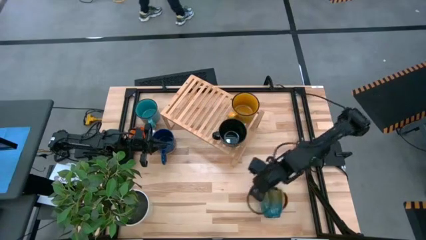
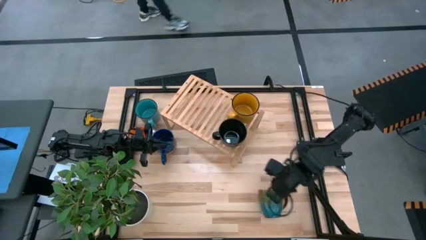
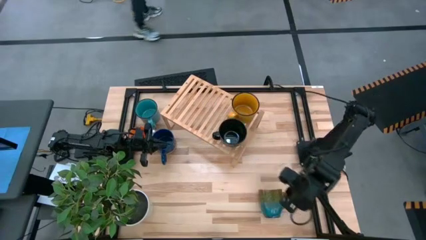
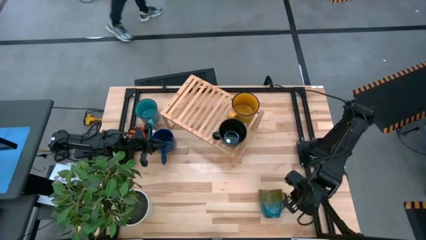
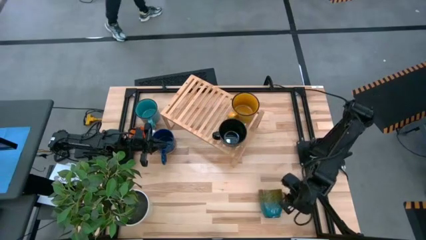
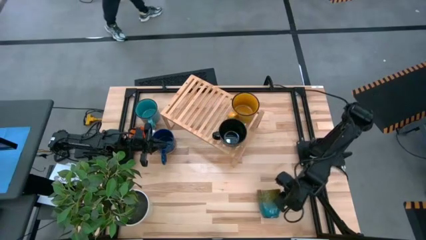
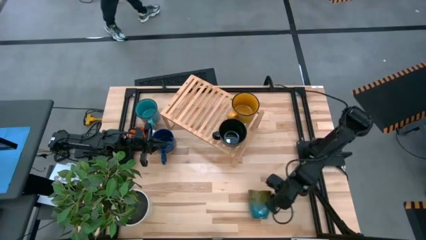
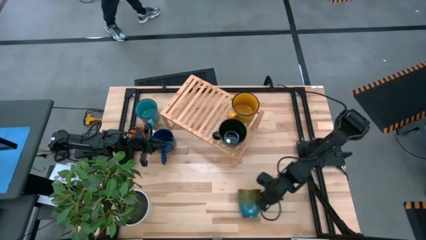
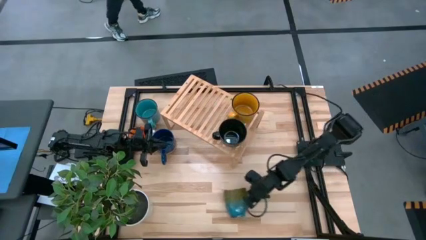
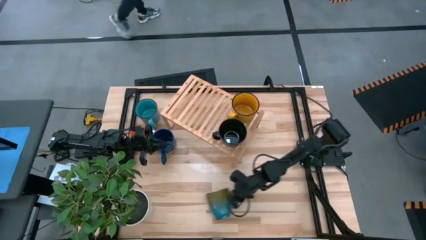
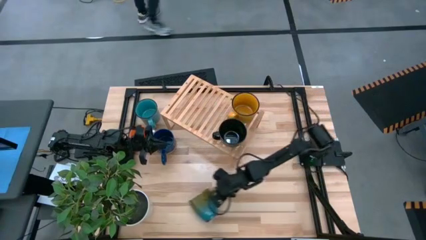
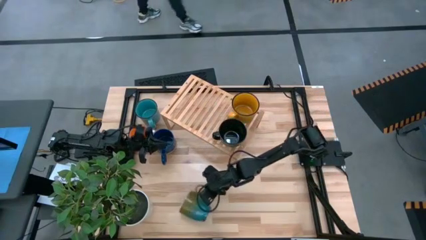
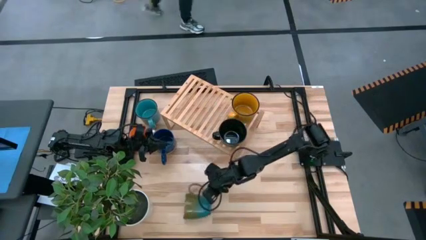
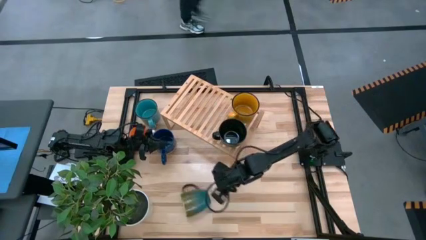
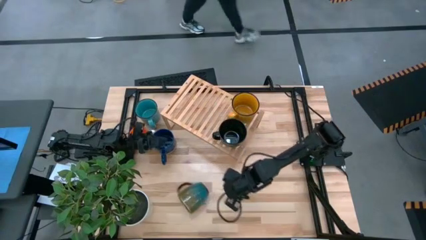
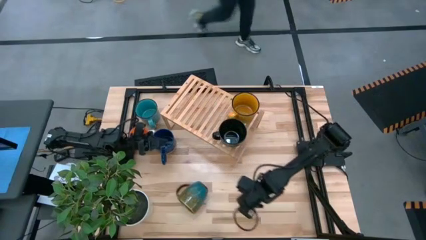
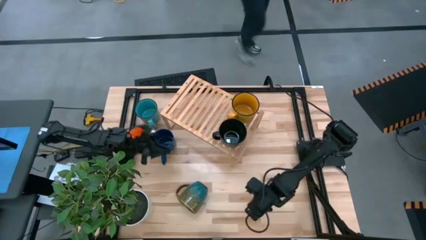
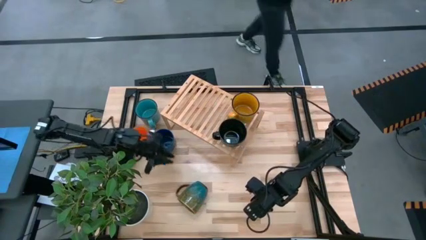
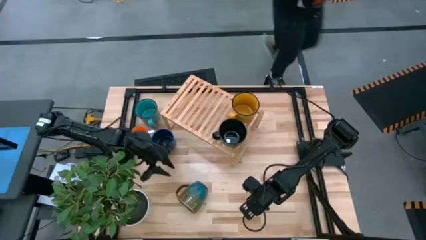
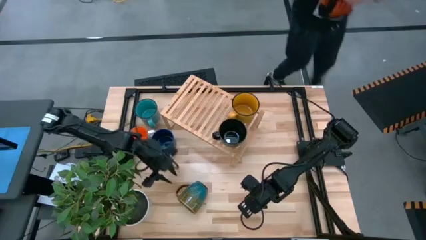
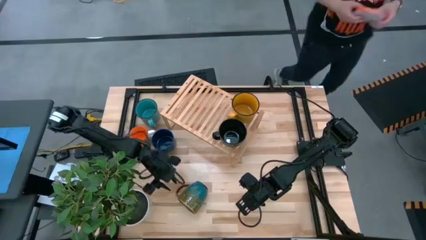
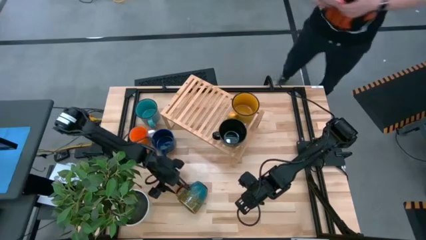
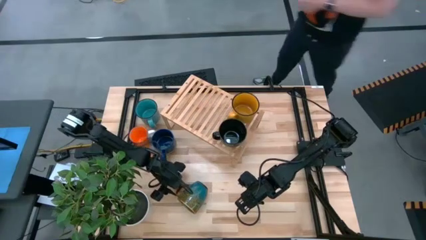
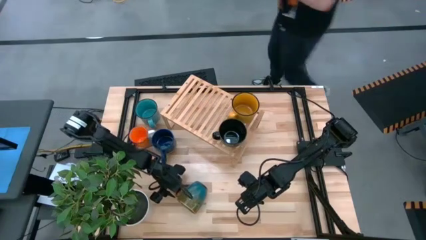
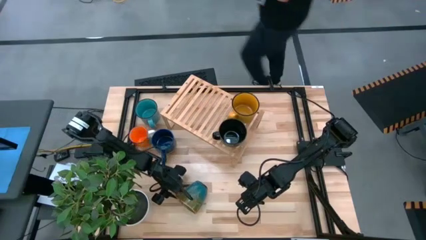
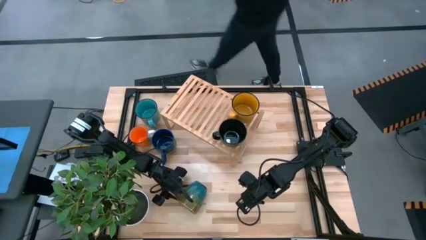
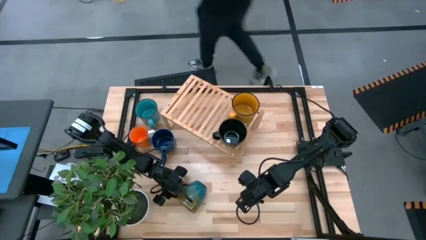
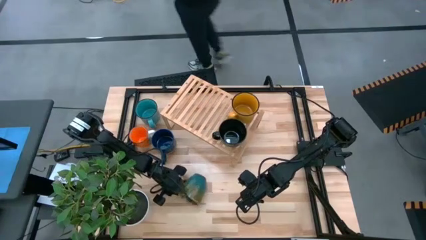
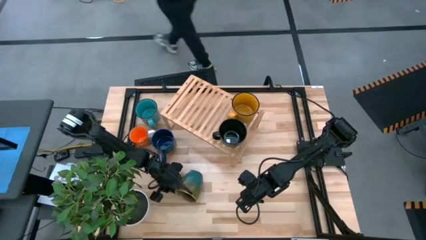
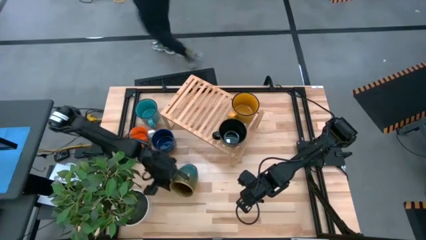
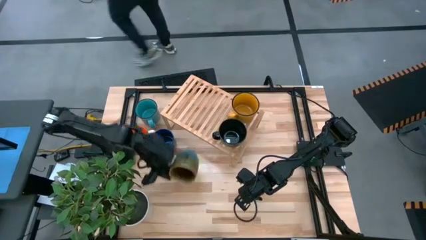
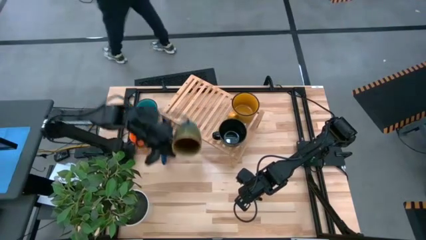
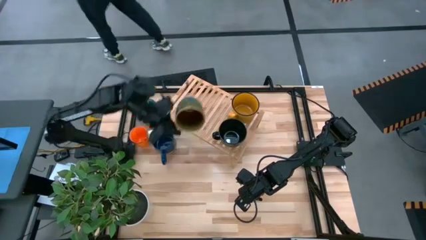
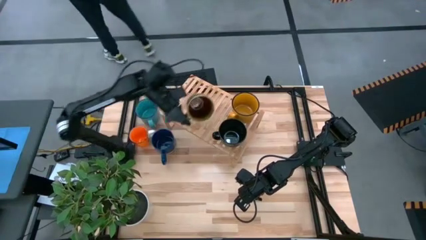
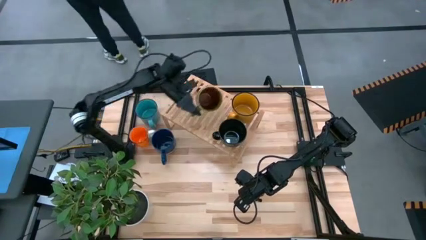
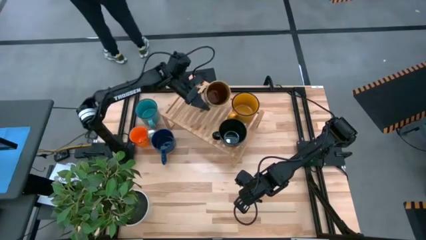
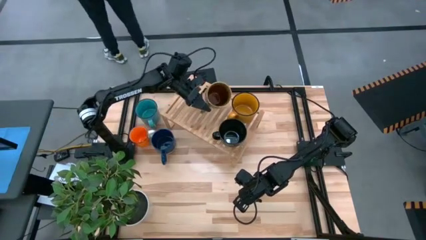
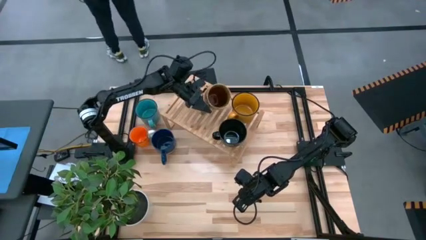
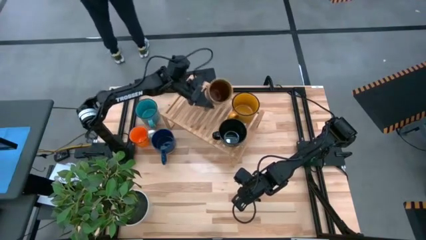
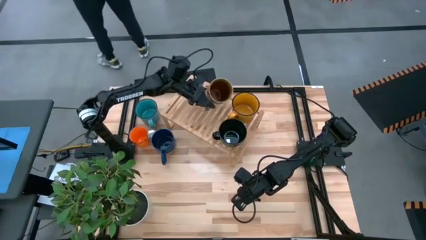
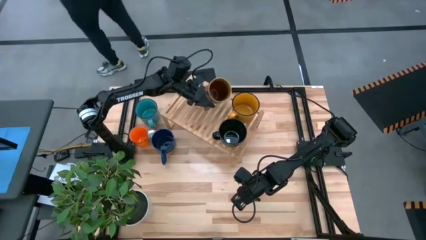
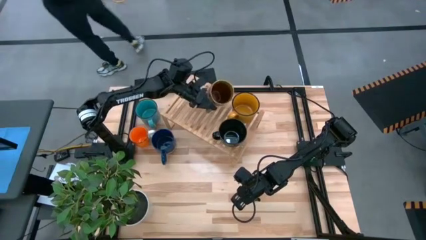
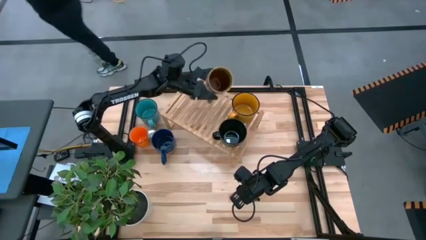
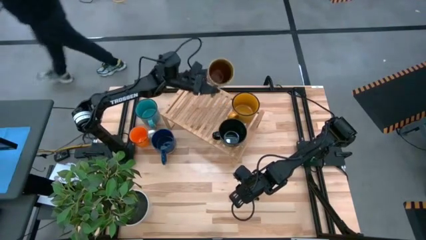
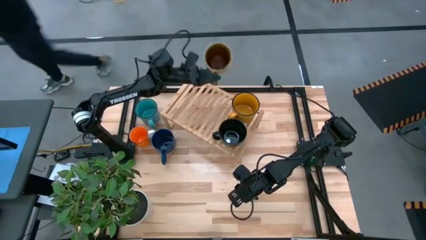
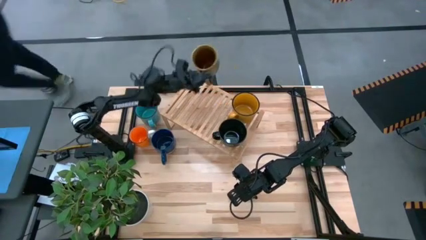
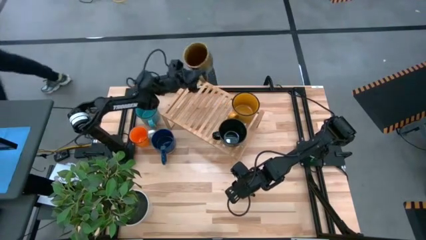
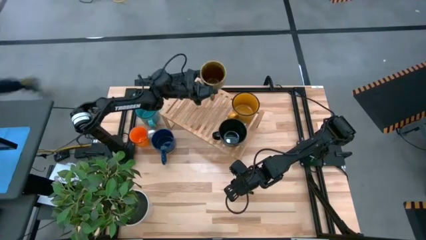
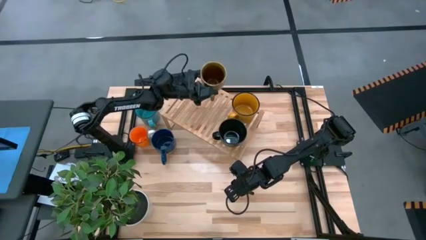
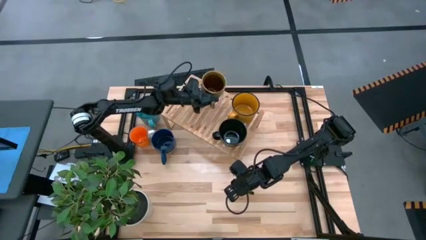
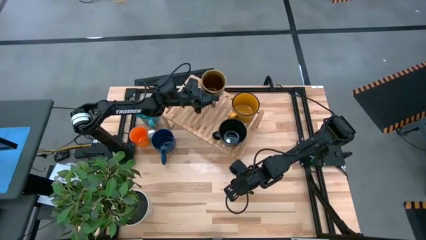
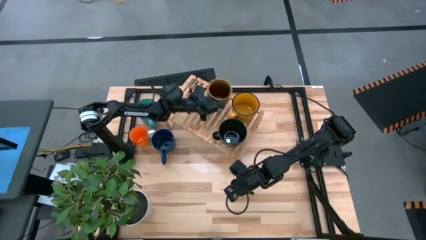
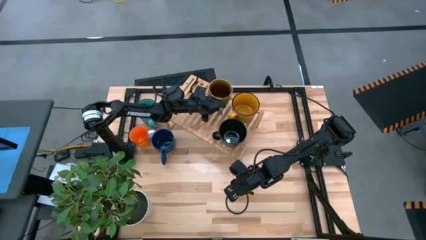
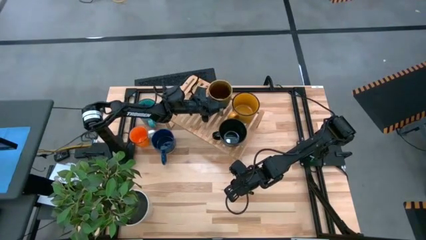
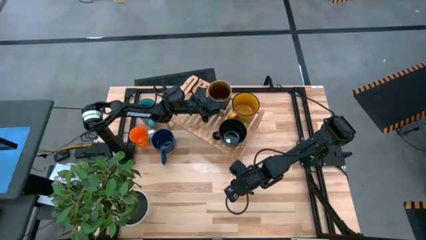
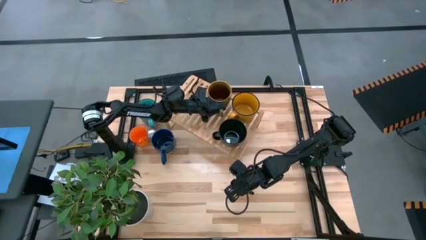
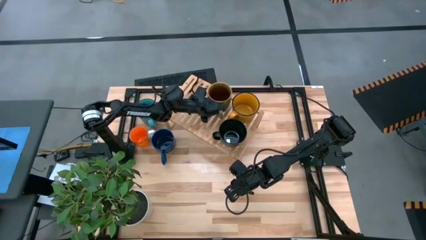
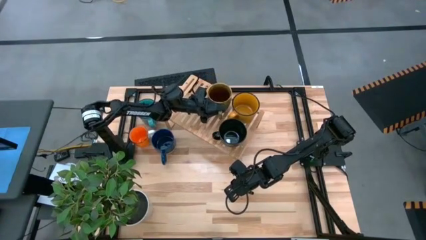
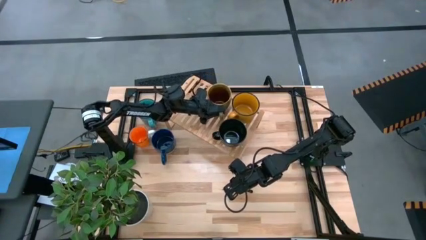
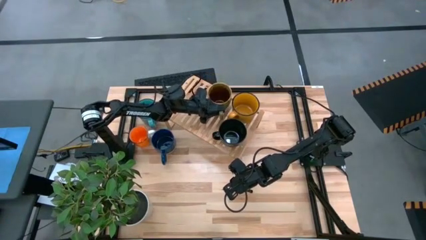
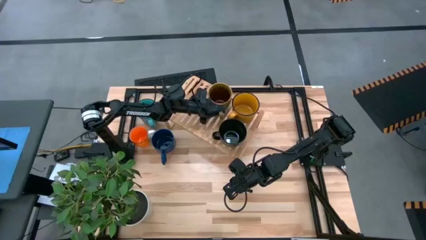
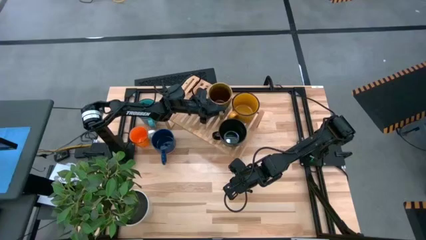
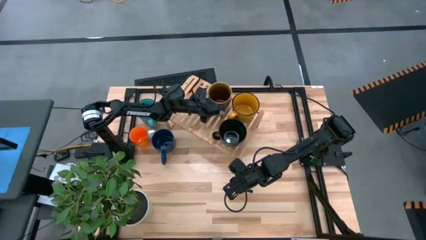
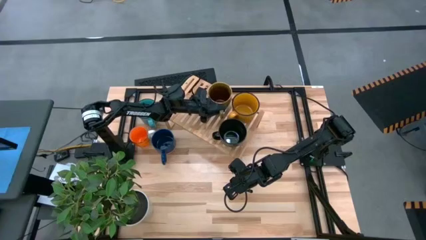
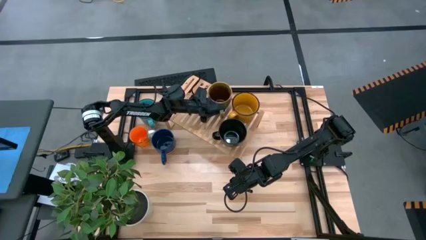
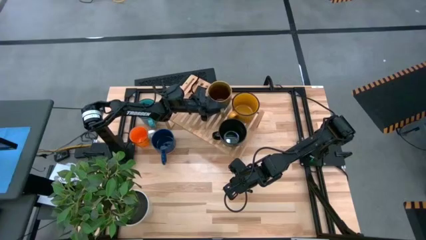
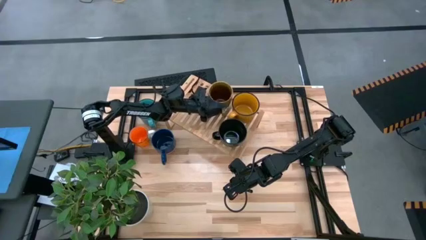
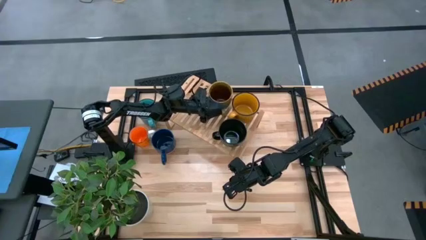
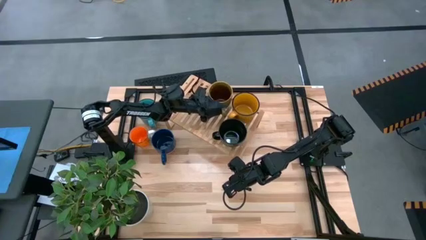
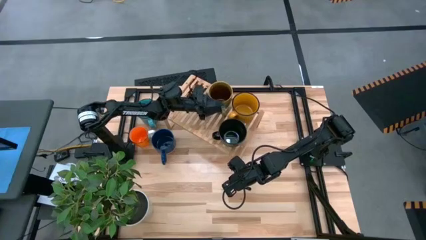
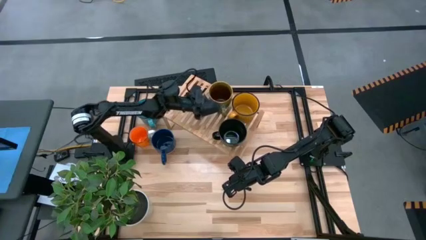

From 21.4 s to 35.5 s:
Task: Place coffee mugs
Put the blue-green mug on the shelf

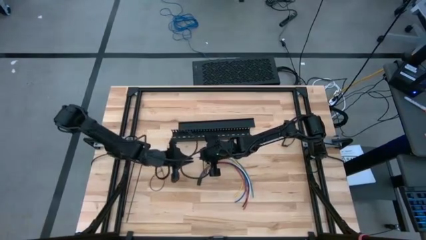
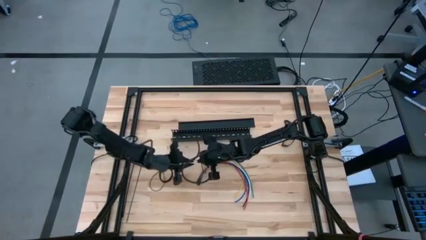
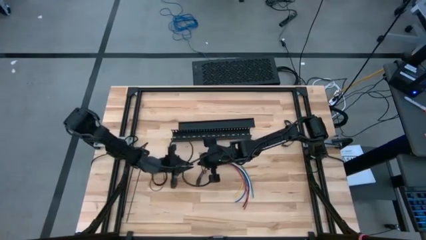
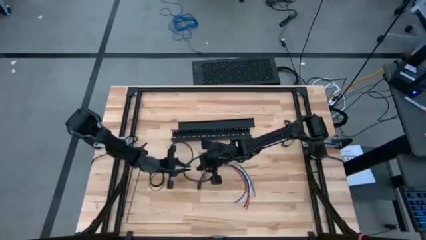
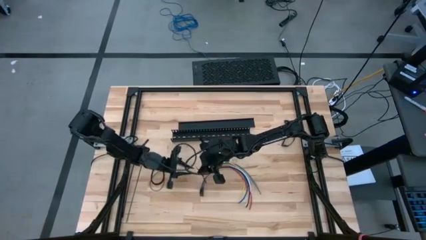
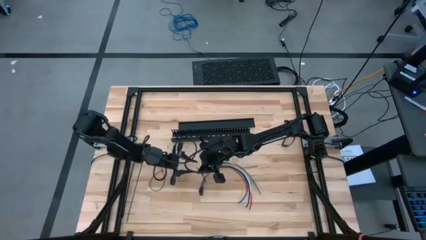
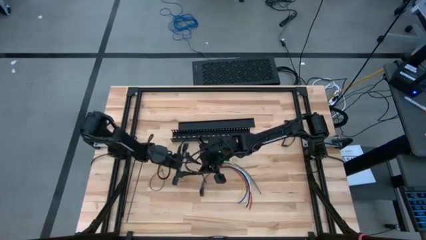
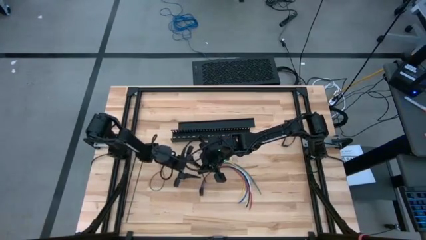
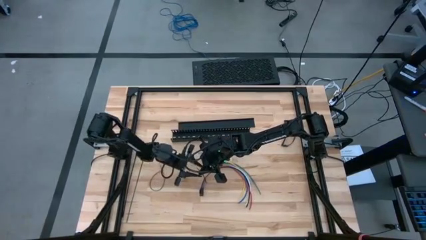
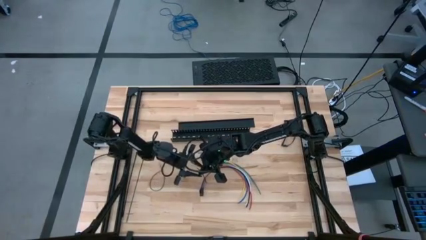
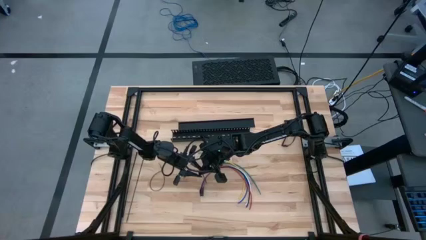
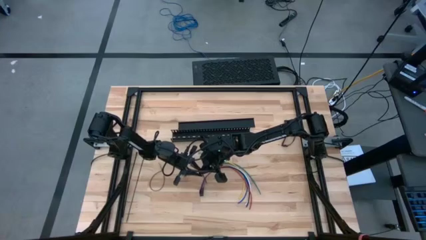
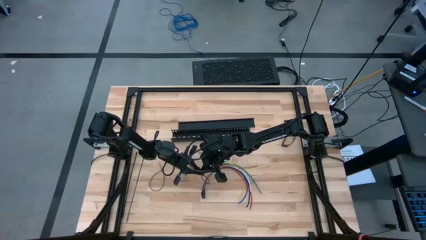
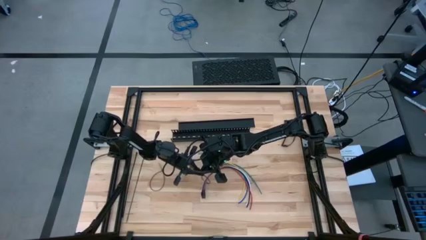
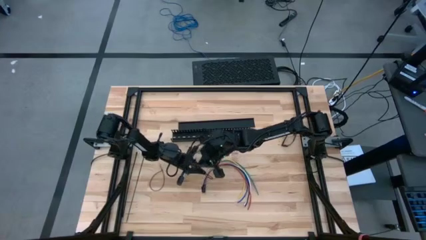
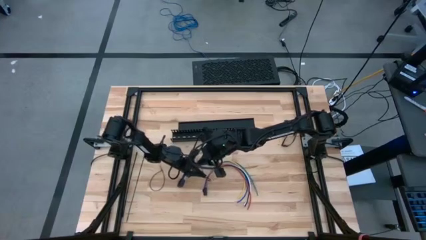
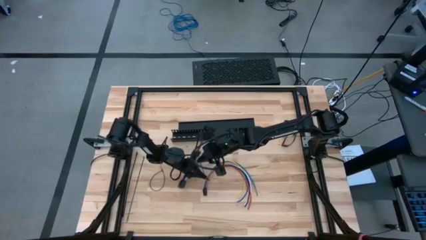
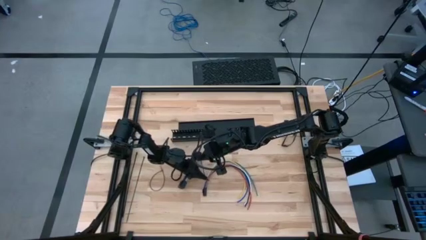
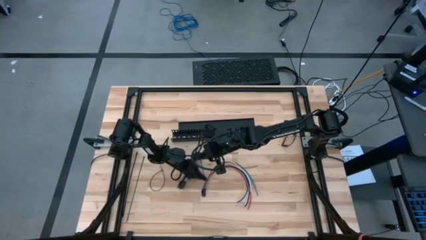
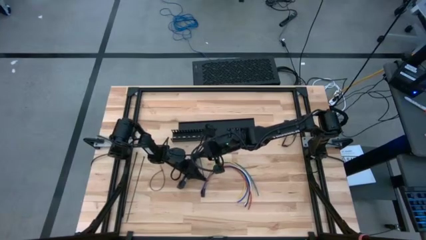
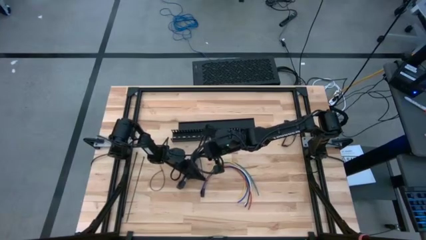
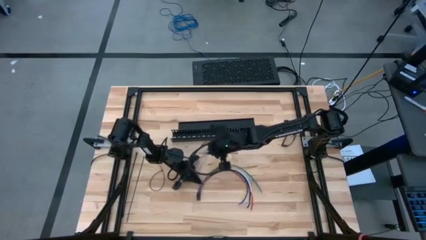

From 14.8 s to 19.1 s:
Task: Ziptie cables
Wrap the cable wire using a zip tie
